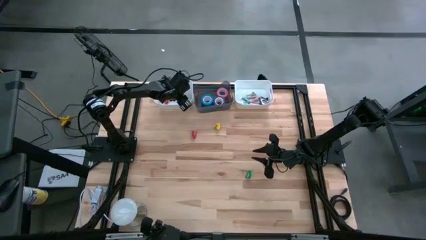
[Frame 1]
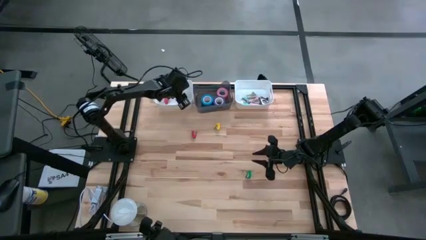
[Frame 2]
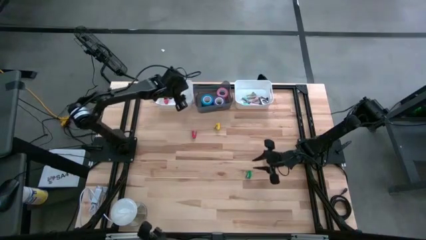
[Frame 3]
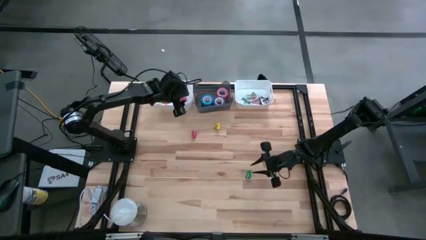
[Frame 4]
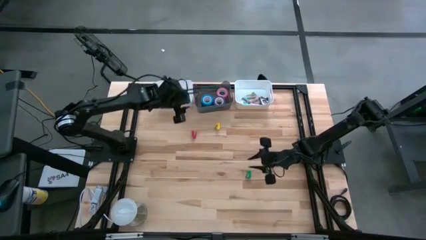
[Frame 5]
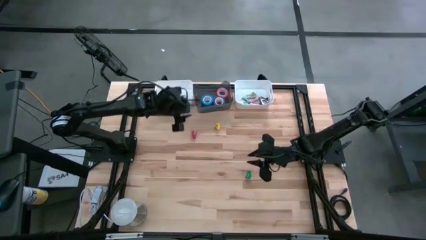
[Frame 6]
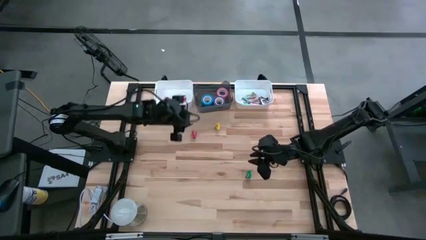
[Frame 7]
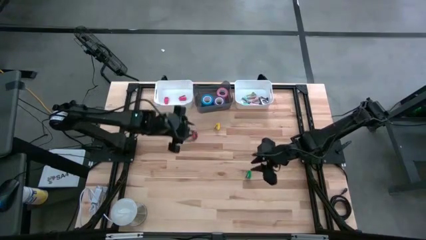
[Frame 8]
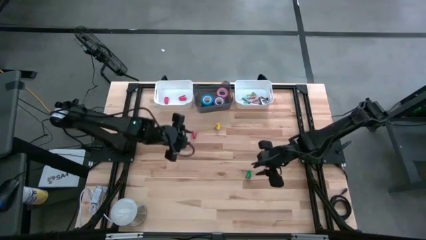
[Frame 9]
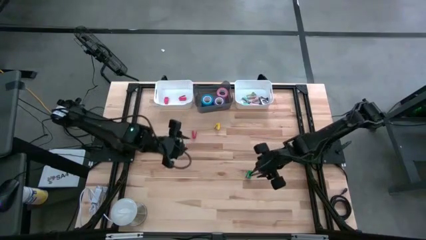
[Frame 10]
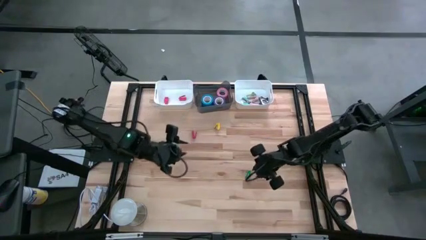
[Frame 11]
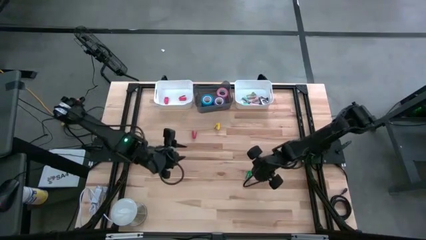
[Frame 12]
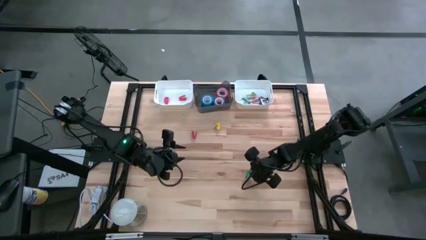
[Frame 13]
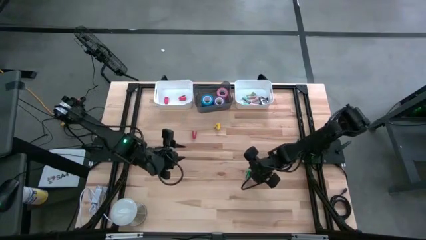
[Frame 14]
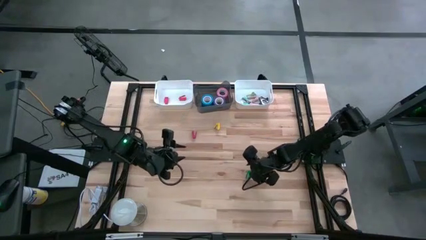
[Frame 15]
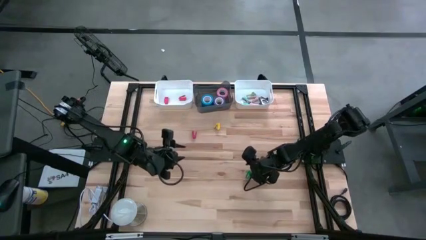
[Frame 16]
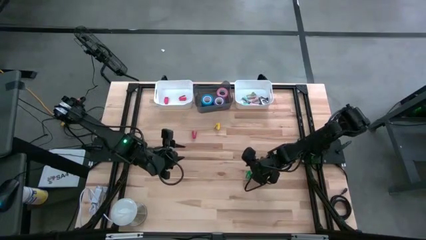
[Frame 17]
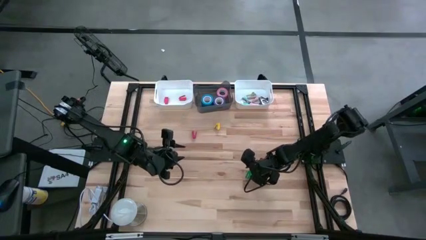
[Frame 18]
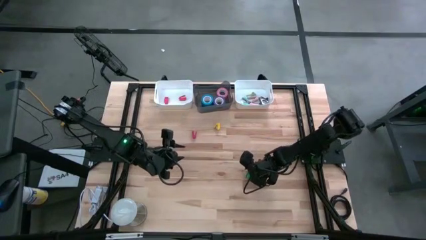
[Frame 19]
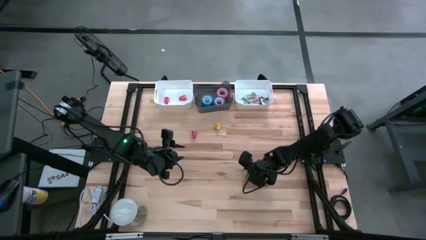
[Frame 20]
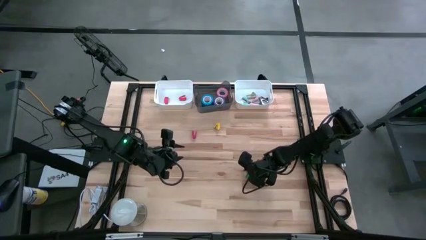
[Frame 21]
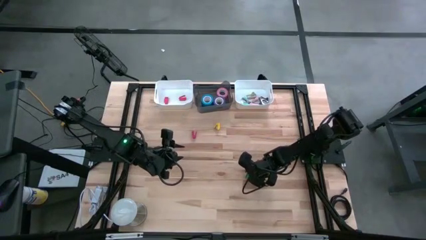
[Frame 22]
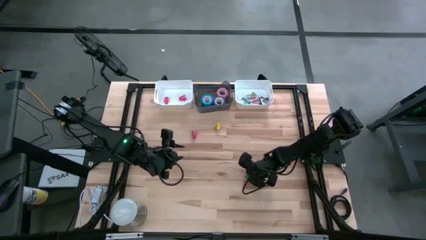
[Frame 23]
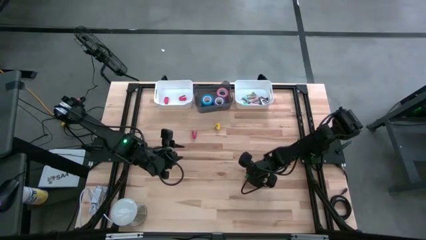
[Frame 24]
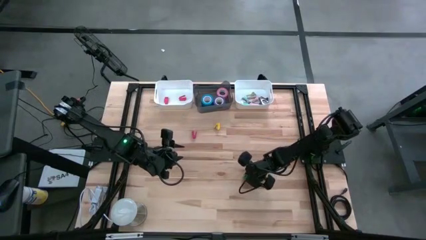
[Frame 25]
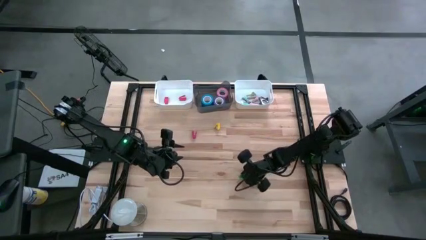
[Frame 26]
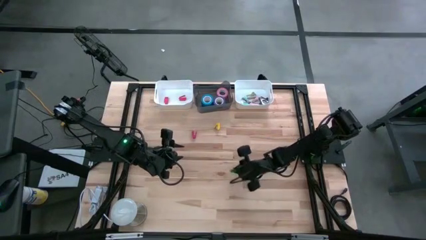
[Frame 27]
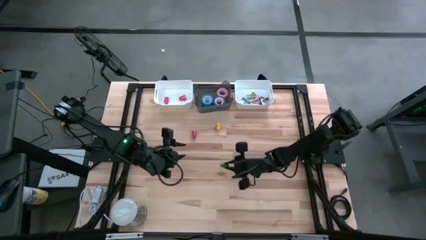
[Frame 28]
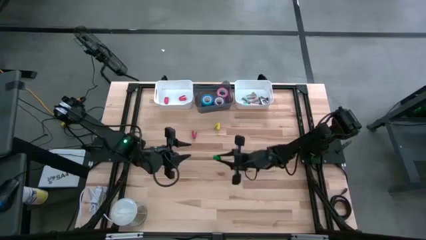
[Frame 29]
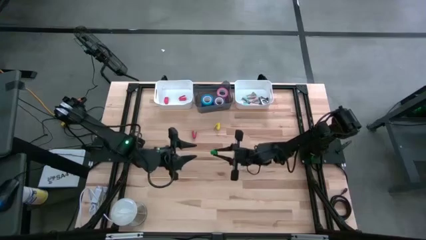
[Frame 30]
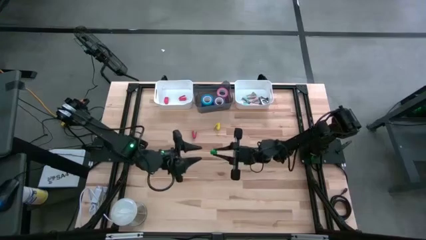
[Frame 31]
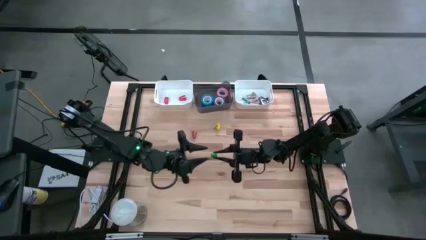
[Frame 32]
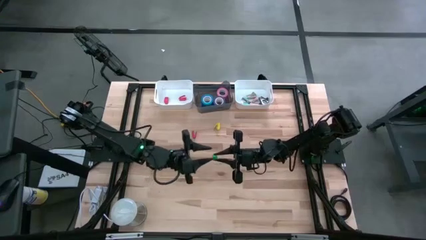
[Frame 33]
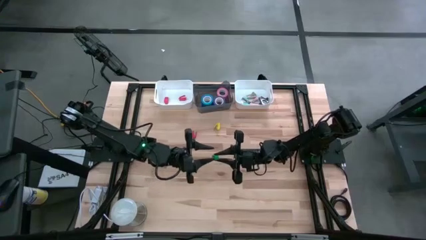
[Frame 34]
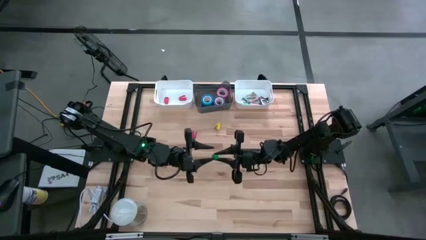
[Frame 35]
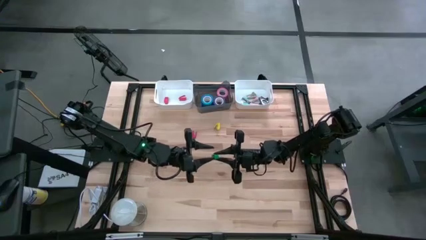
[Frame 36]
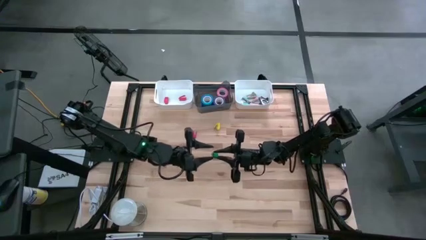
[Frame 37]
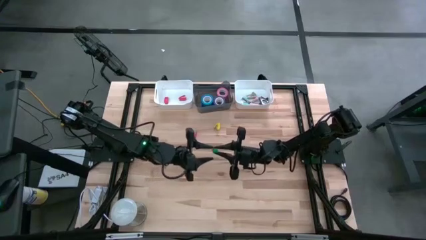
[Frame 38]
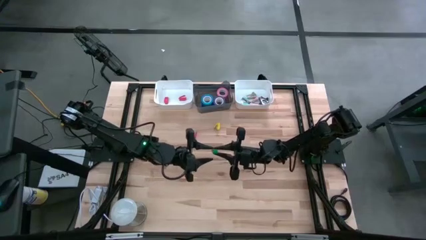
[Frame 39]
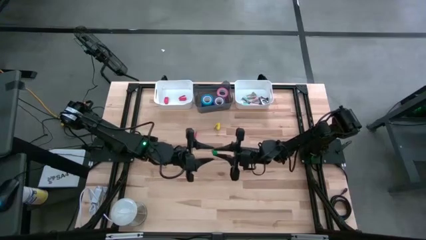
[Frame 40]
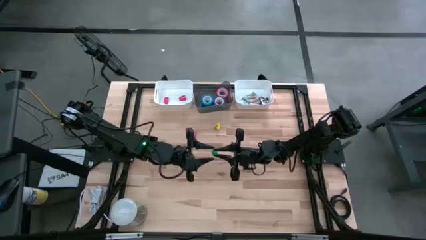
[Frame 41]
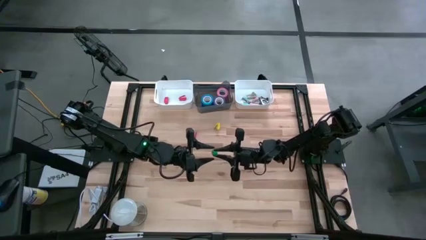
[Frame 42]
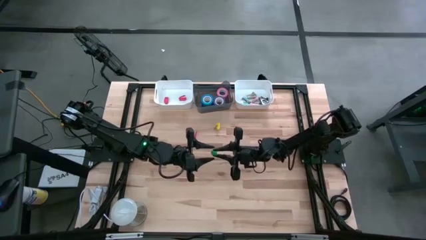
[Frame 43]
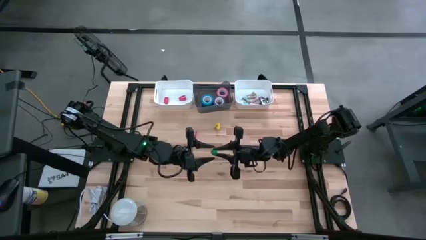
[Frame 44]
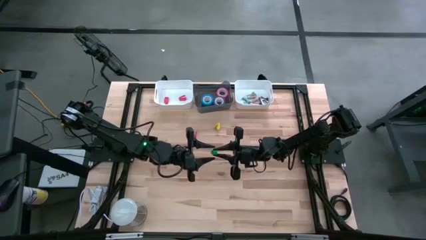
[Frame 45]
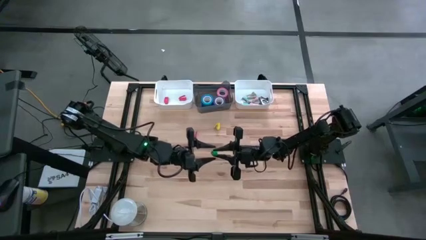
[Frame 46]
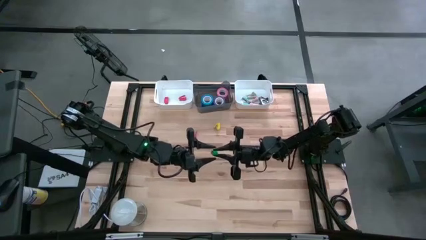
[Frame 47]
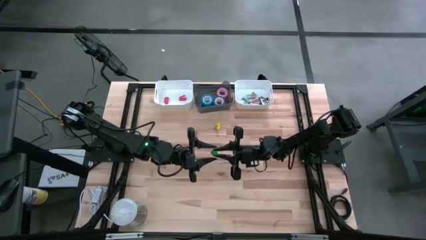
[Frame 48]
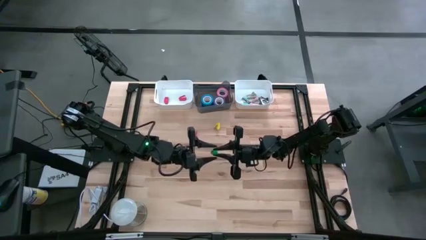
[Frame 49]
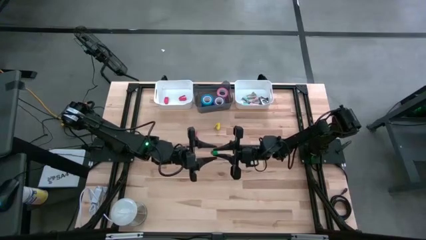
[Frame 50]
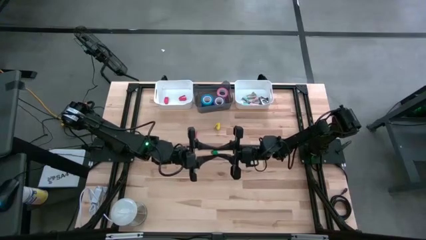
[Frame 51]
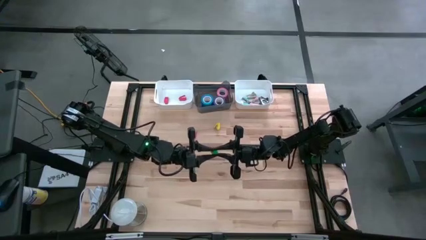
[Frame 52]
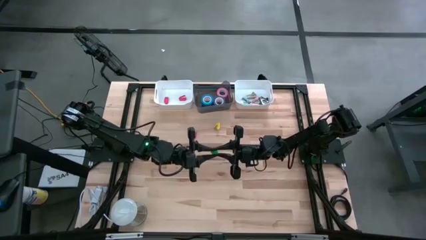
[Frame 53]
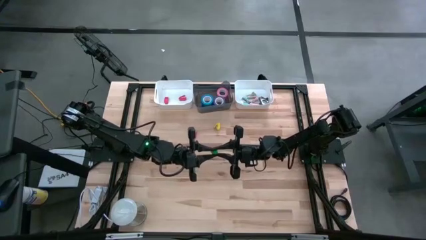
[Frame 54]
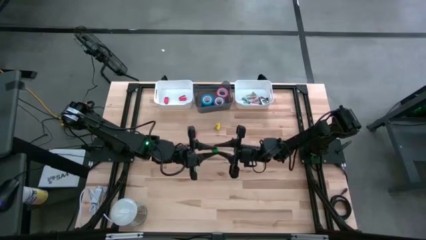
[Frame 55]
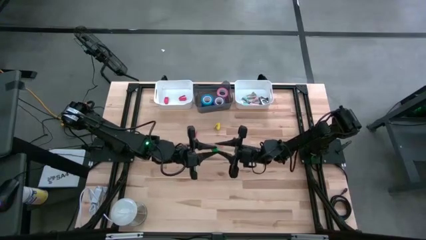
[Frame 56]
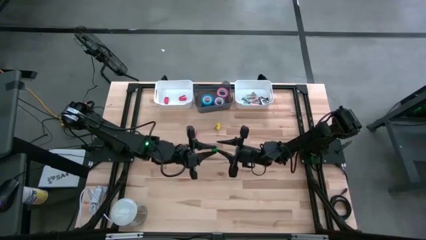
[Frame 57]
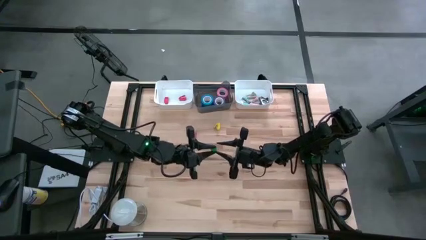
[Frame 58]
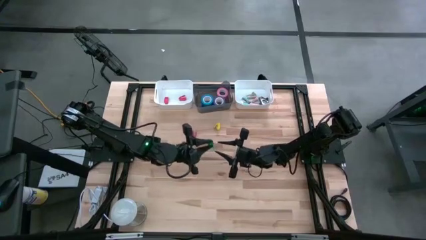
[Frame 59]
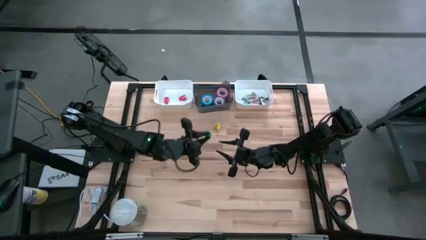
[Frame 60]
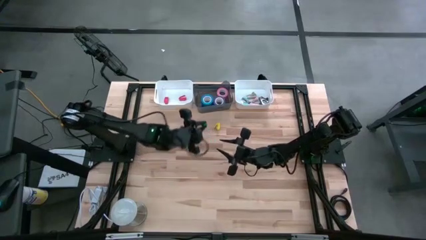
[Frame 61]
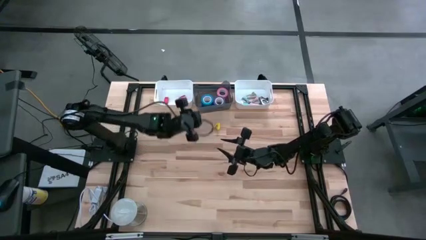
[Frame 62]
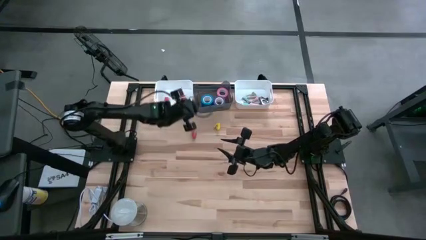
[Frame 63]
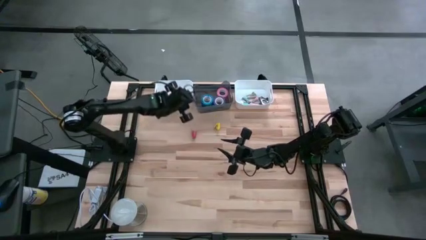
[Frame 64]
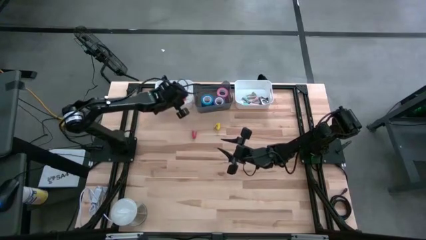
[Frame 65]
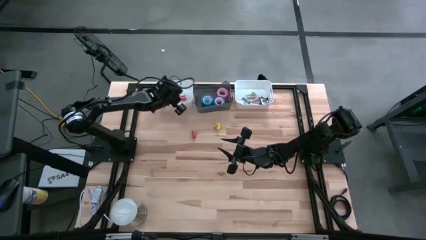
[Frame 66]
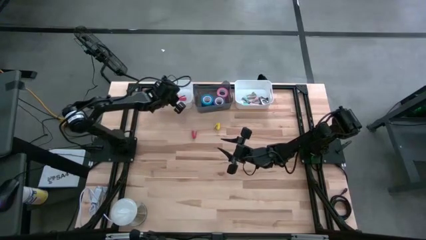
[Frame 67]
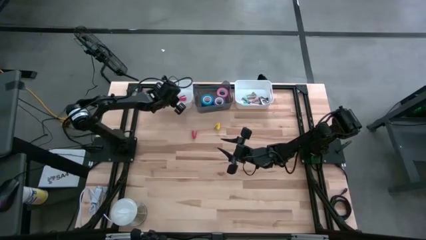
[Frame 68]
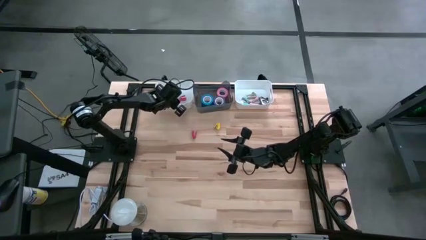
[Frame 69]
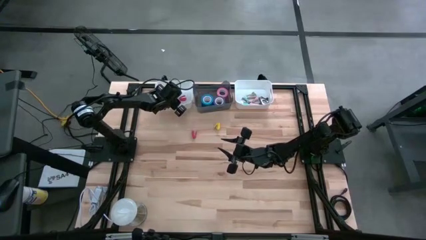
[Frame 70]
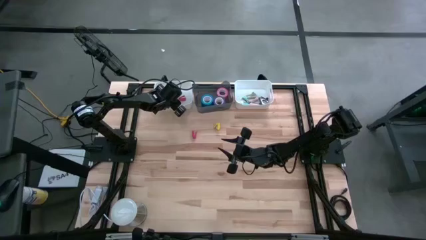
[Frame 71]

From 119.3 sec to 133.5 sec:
Task: Pick and place Stapler, Stapler remover, tape
Put the green stapler into the left white bin

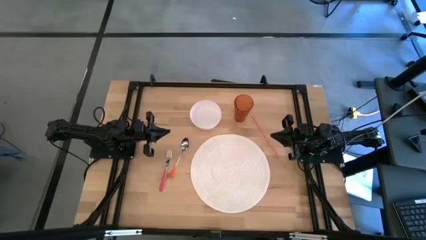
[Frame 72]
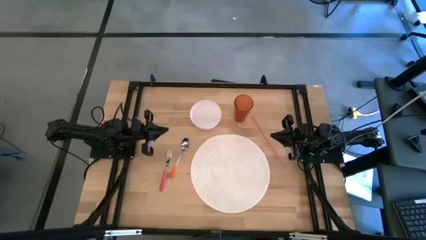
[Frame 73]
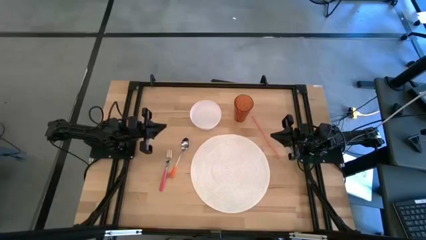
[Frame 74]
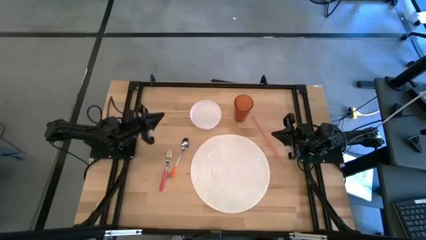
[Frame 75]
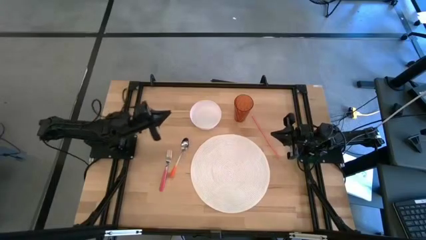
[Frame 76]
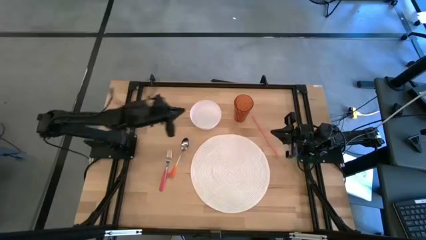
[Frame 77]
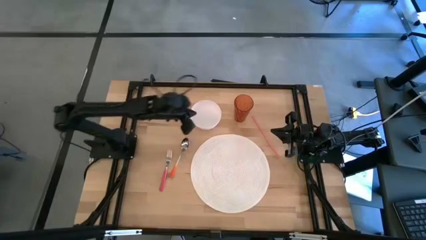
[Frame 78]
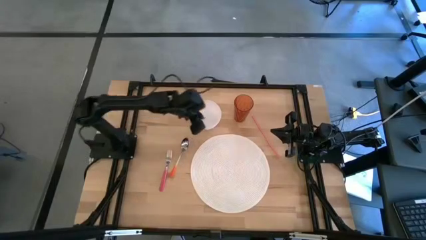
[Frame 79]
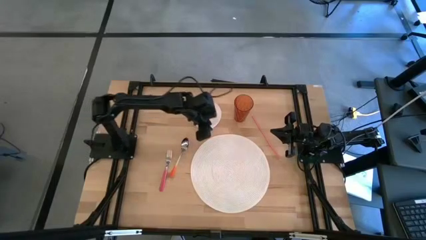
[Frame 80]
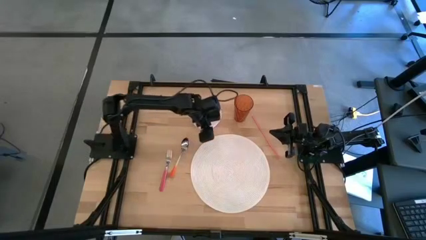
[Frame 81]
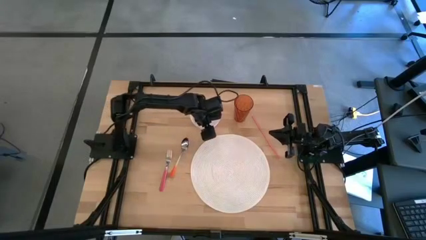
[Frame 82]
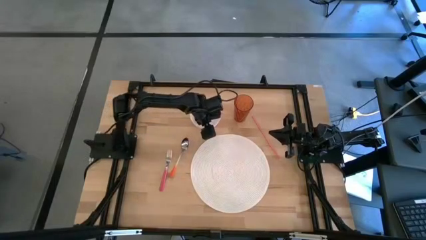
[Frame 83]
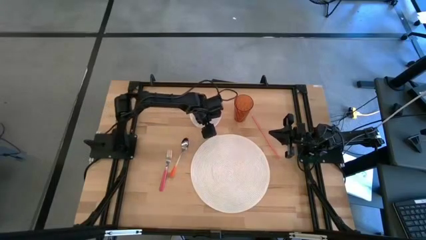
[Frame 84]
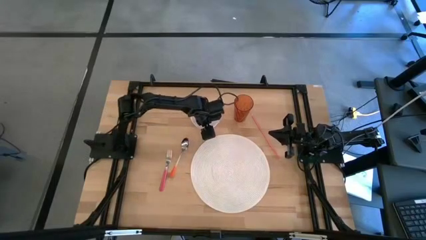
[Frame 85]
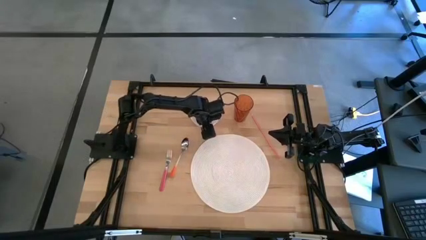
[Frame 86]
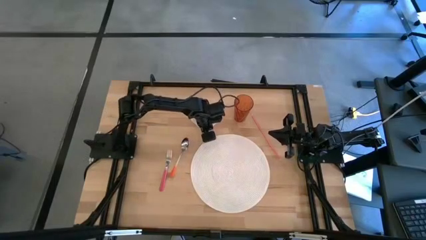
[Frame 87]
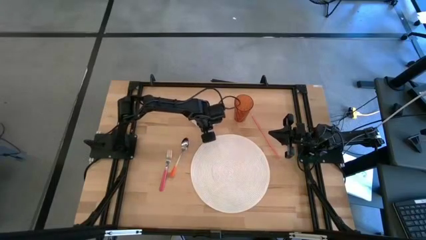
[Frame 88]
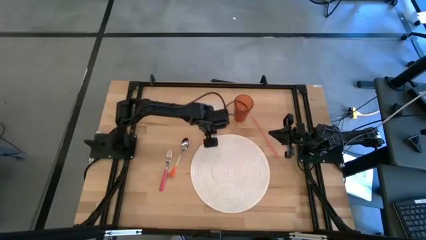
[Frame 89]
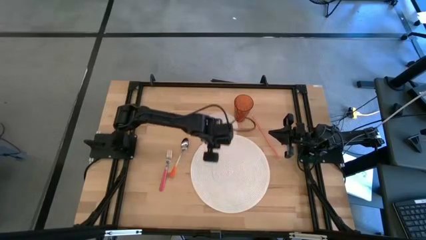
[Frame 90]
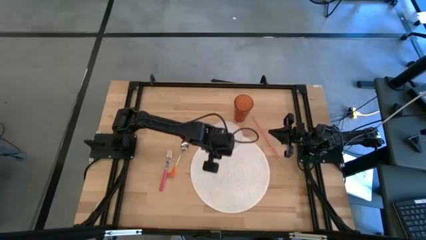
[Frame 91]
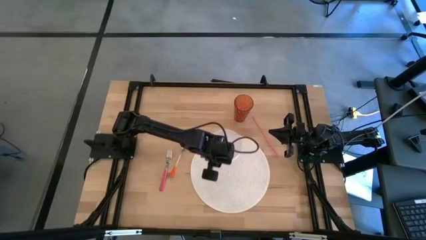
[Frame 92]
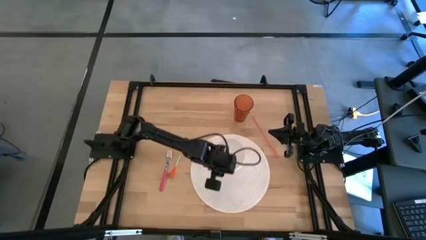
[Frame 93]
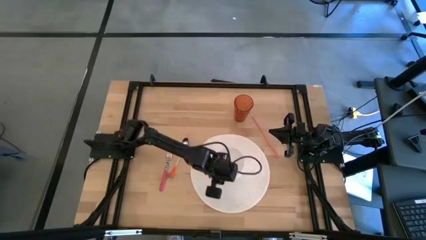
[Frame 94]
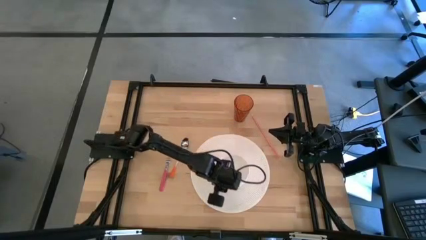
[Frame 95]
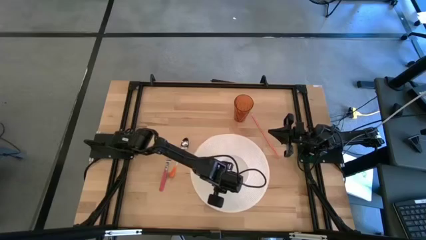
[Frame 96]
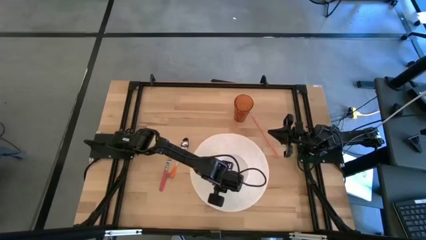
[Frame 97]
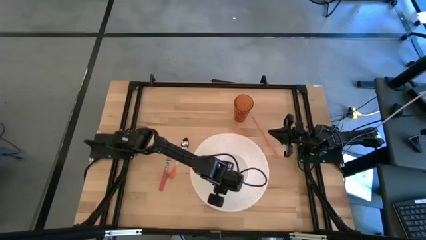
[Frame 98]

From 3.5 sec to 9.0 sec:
Task: Pick & Place Utensil
Put the white bowl on the white mat
